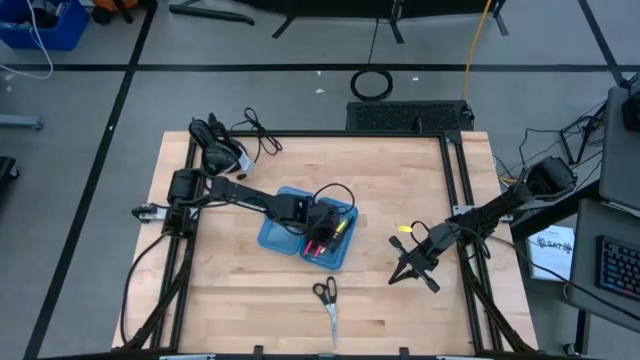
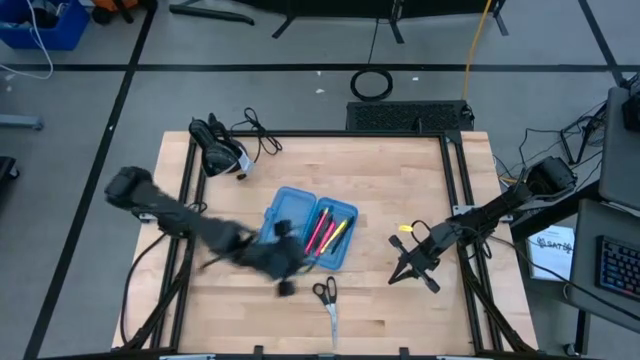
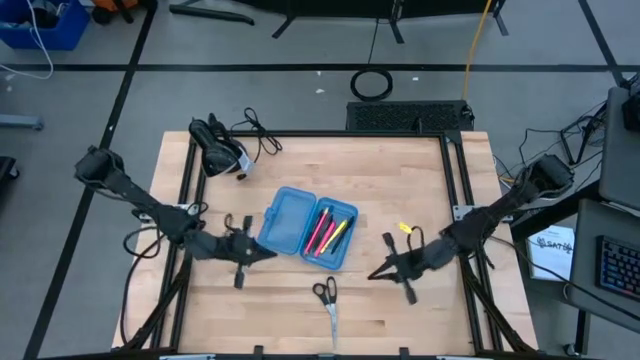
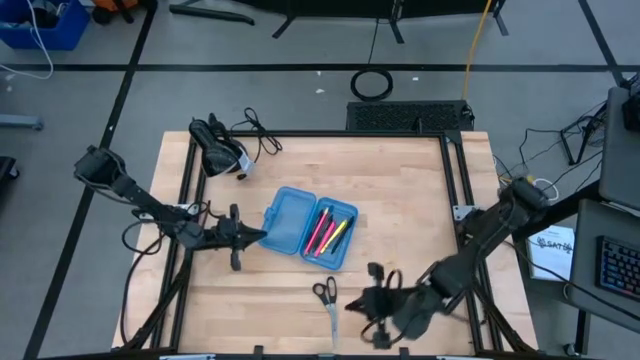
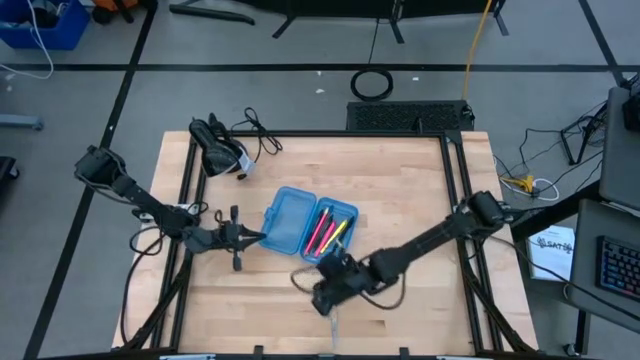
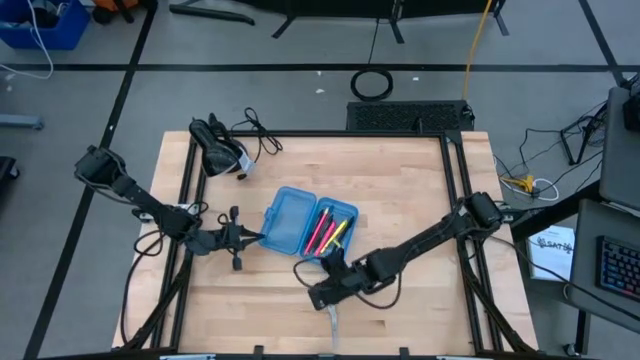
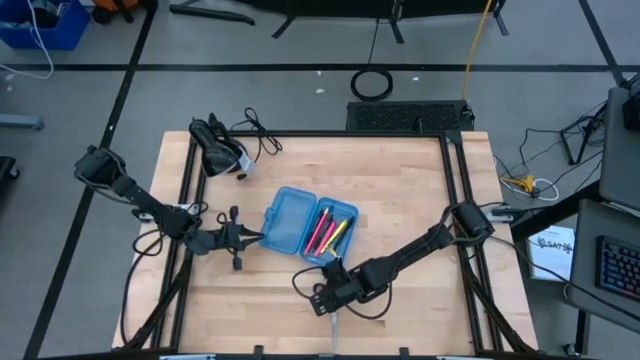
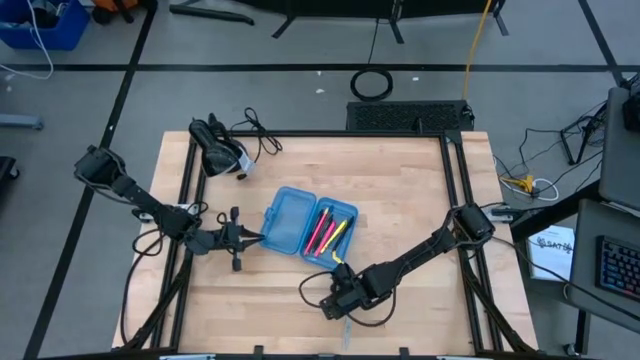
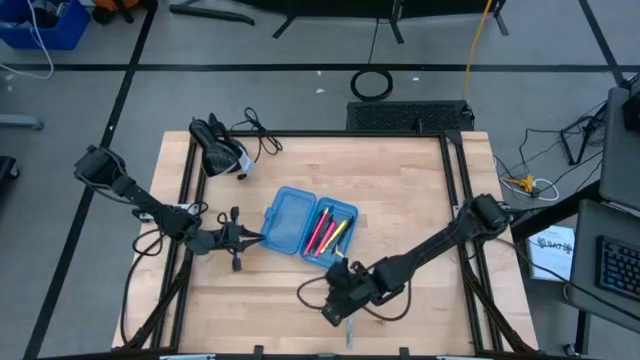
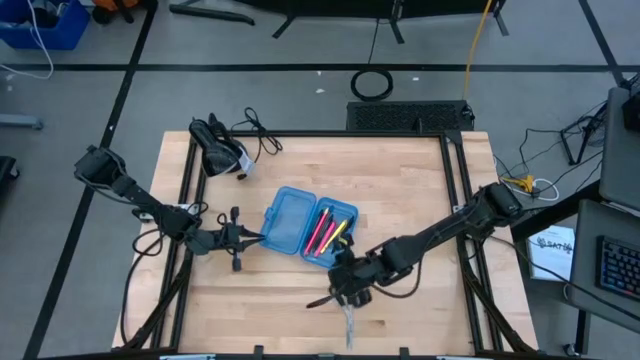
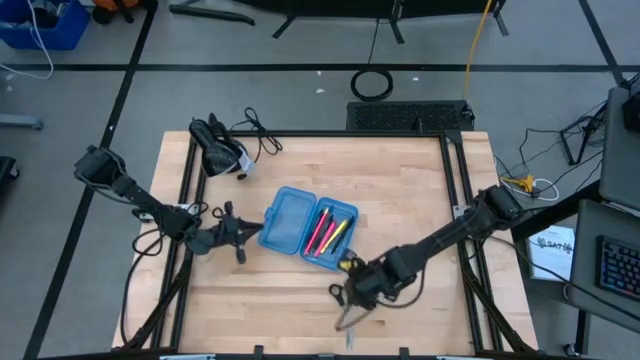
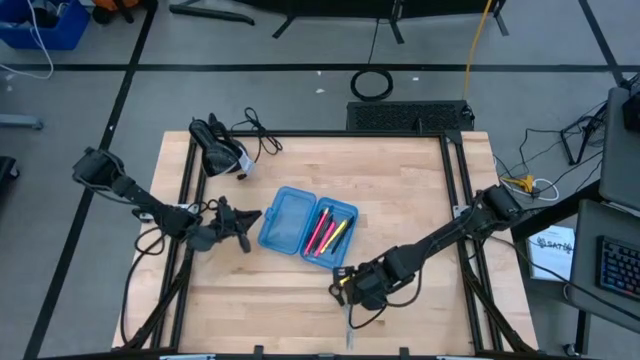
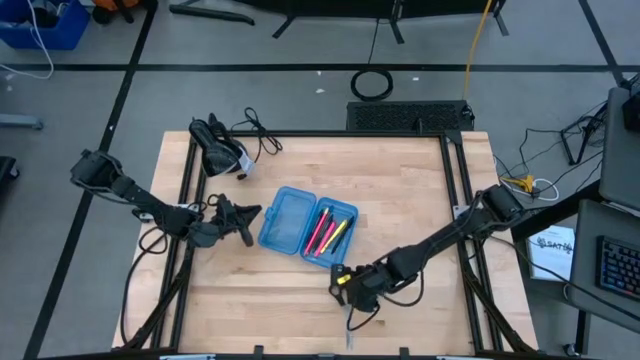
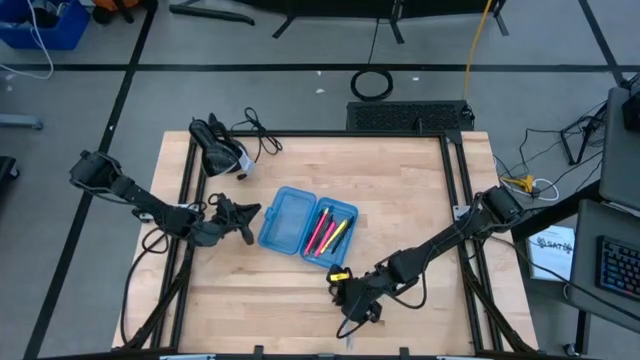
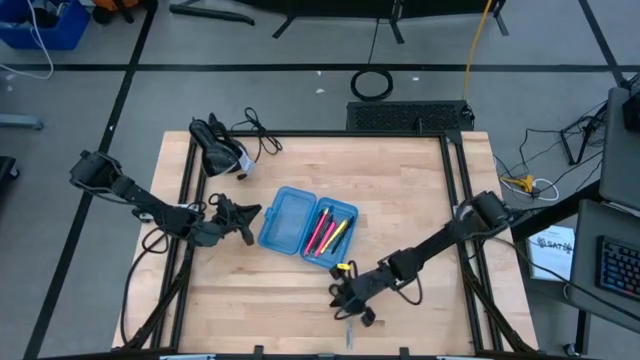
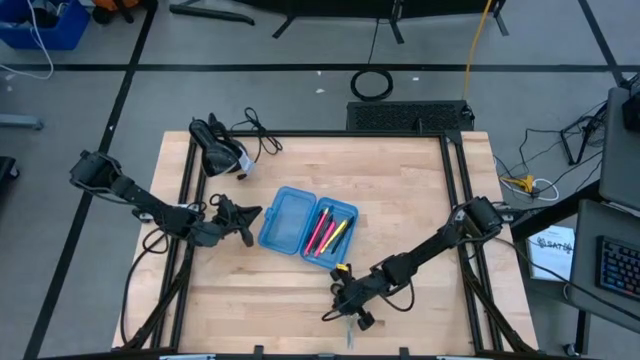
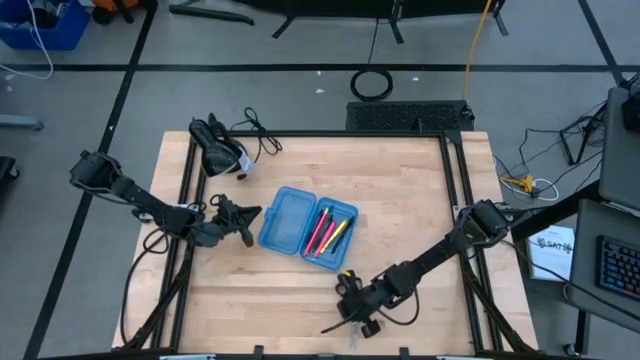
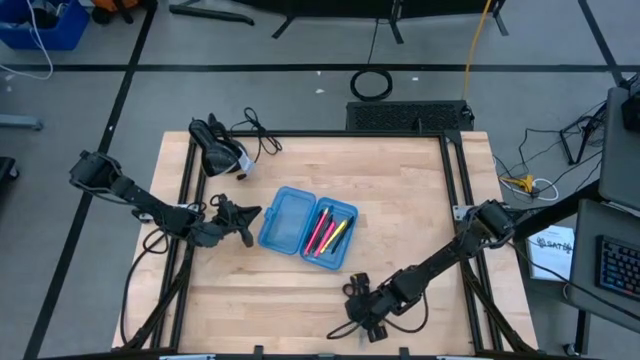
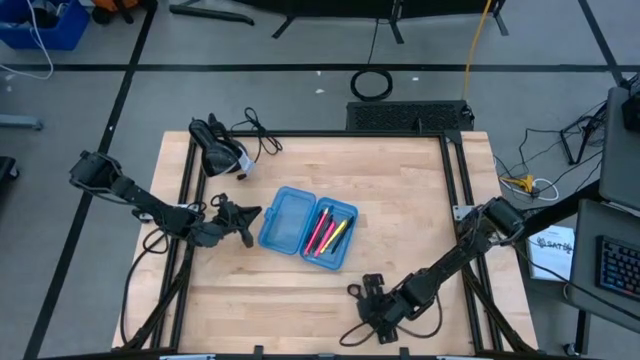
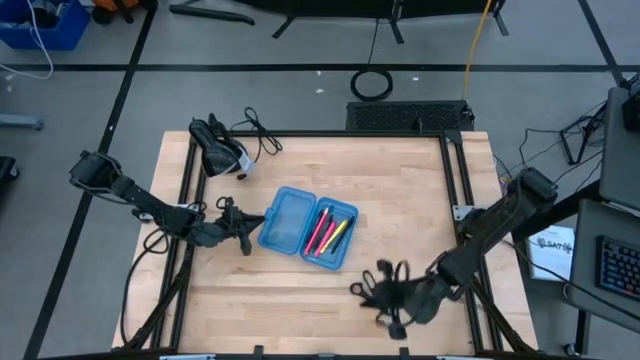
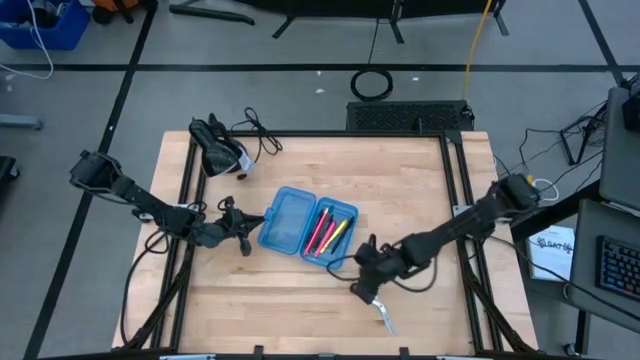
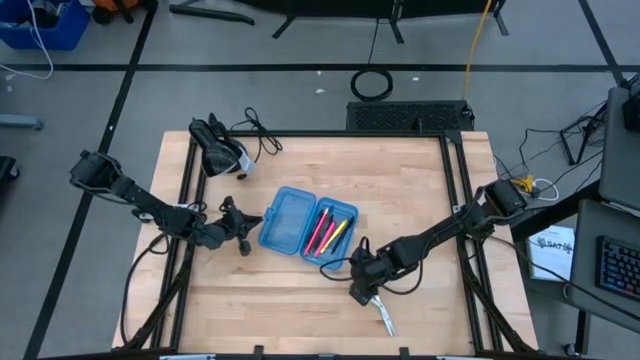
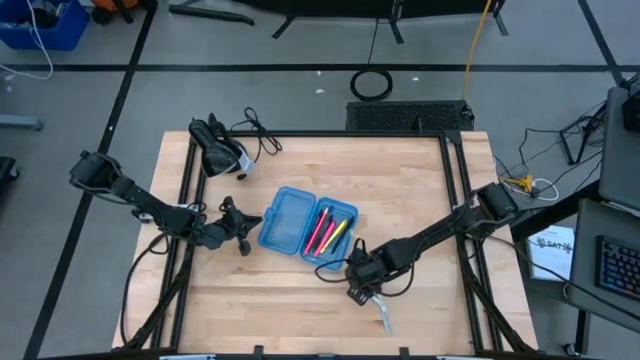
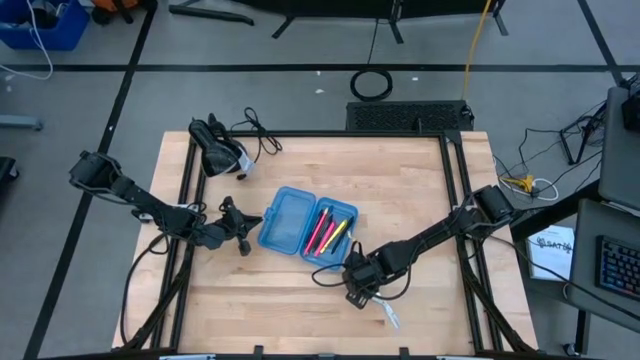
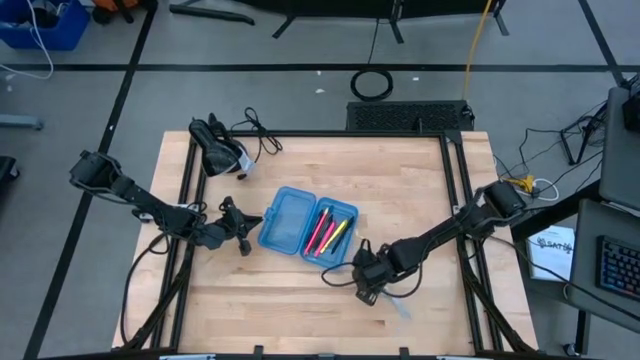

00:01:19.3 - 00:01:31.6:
Task: Pick & place school supplies into a supply box
Put the scissors into the supply box

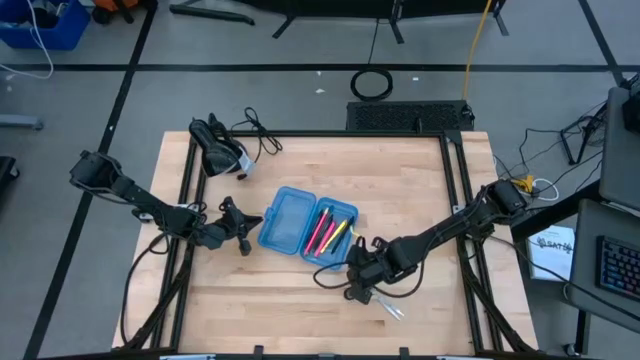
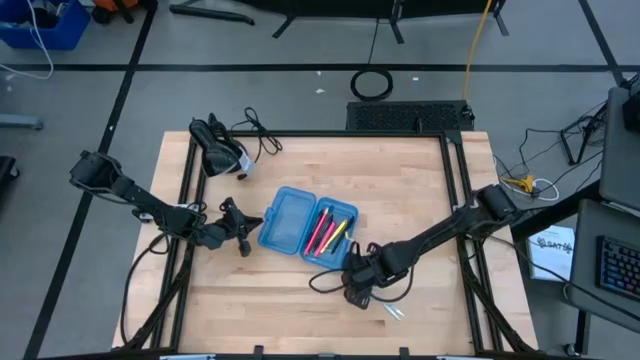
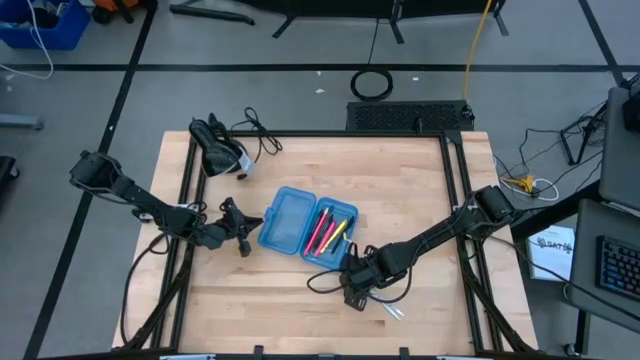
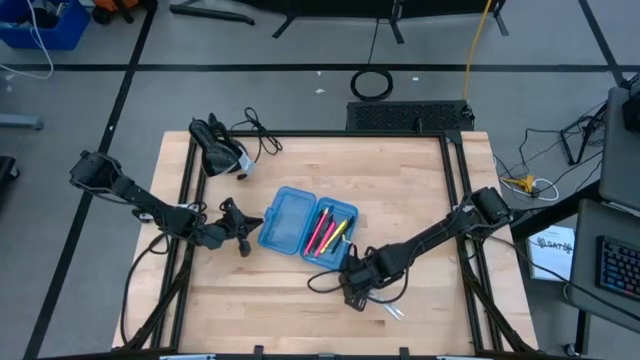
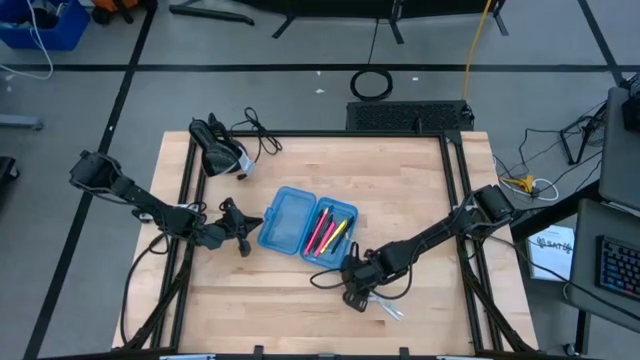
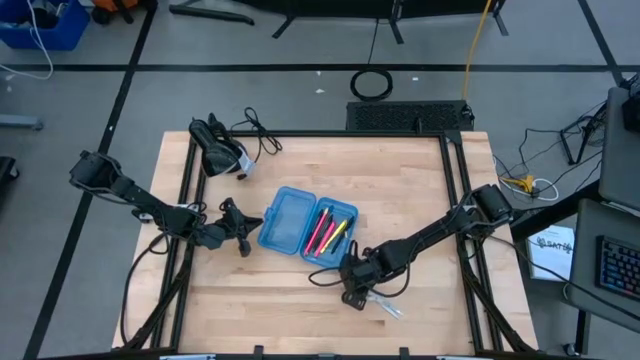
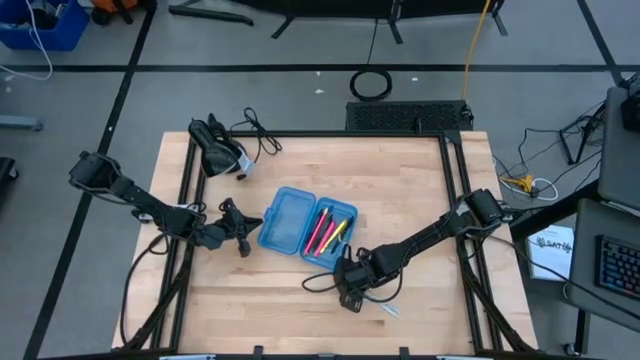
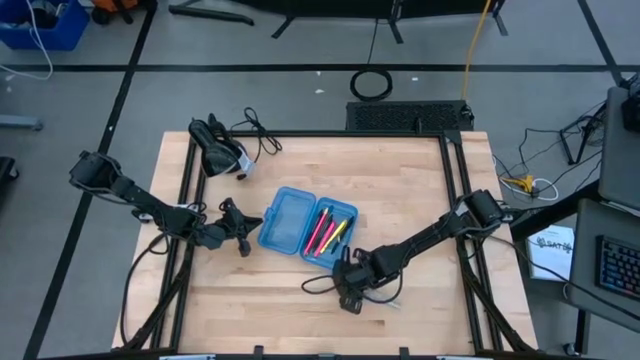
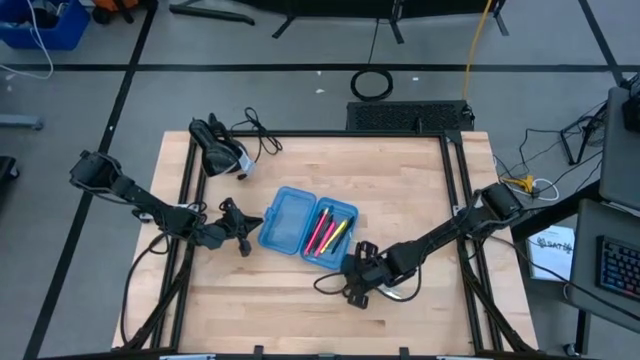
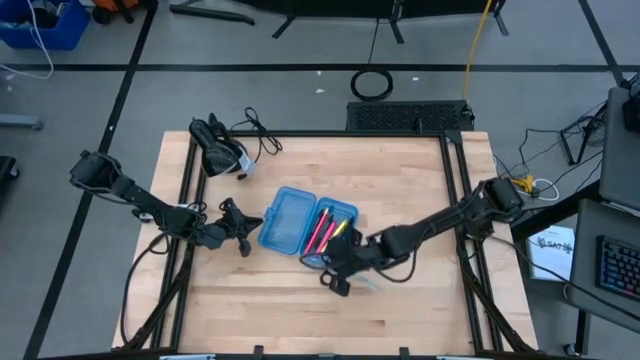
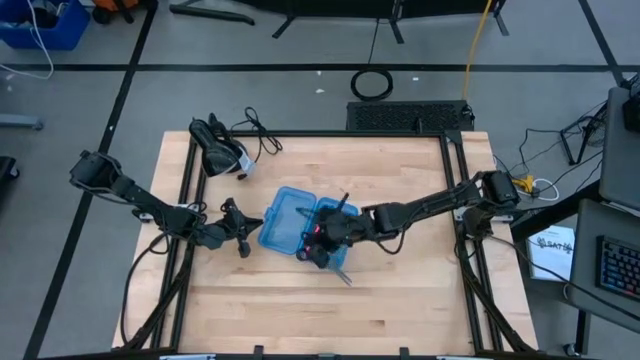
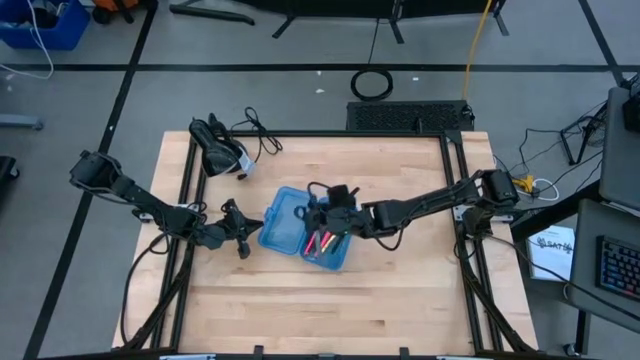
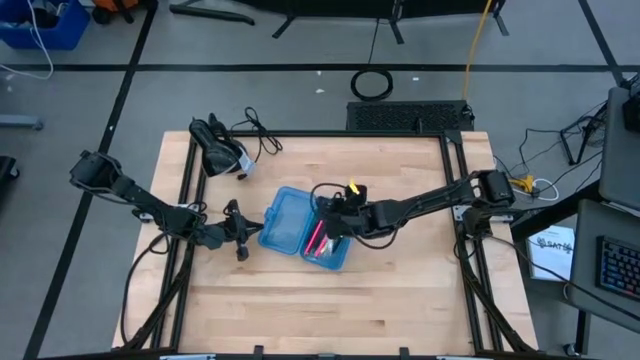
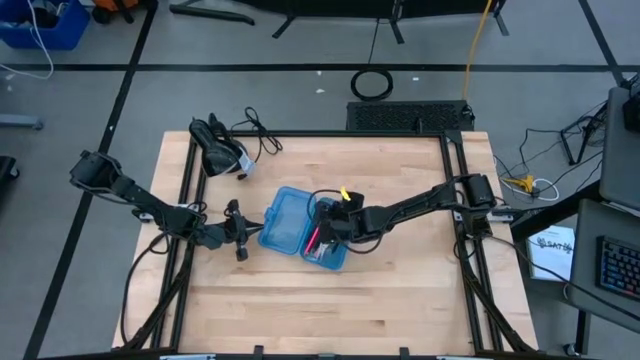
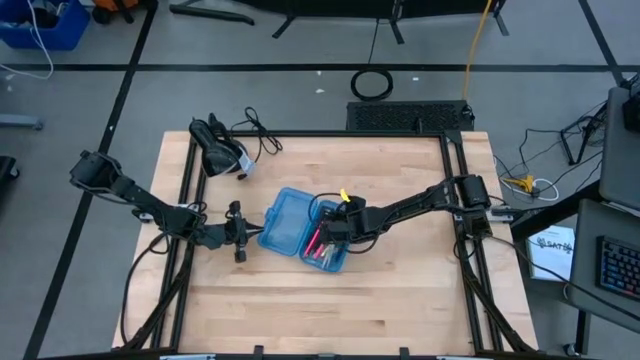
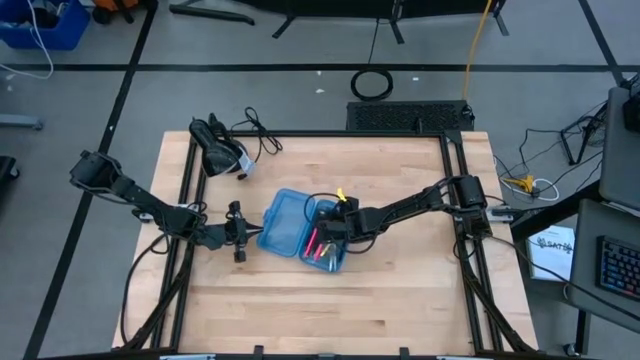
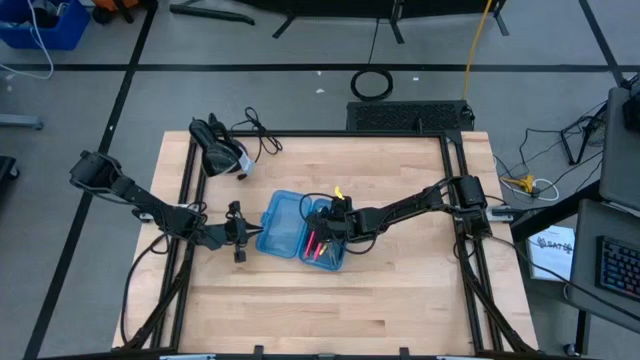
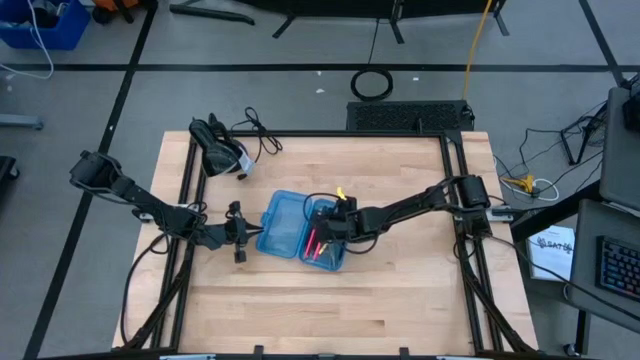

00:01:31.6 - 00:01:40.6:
Put the scissors into the supply box

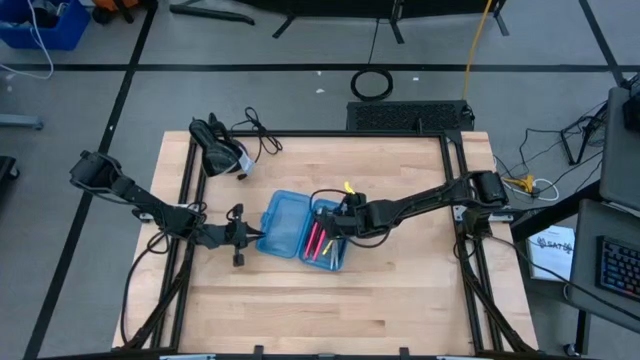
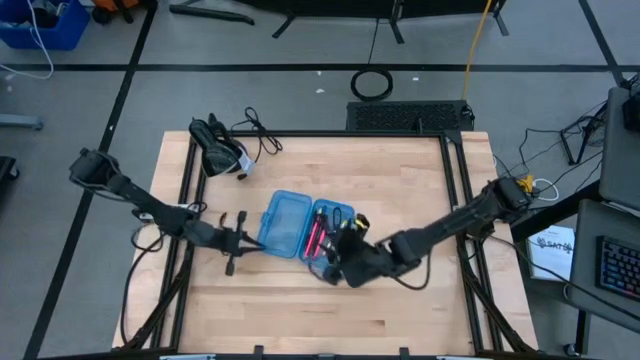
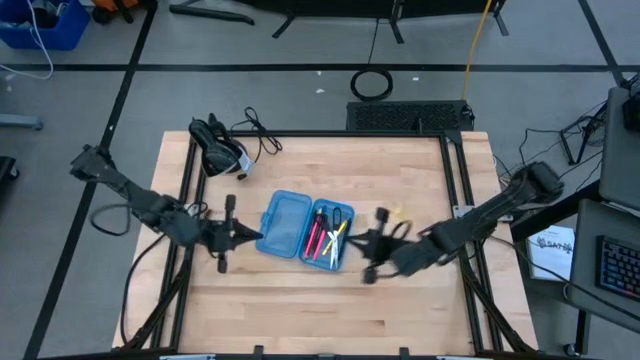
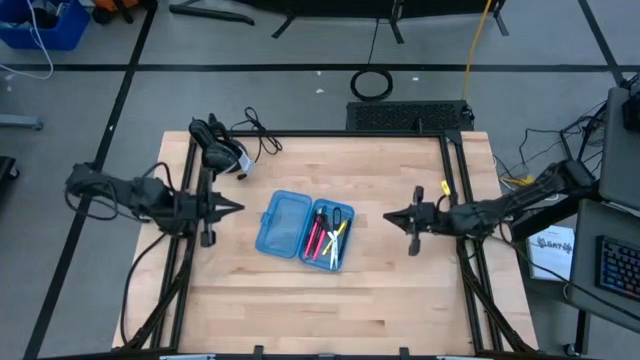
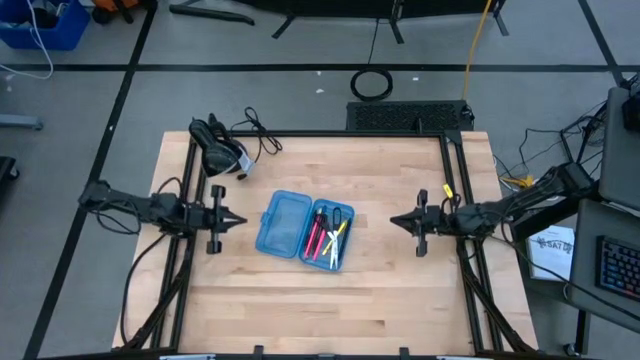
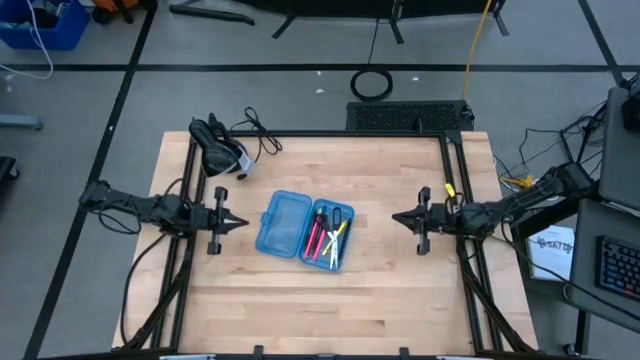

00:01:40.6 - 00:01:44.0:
Return to Home Position
